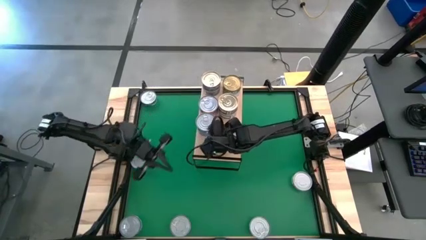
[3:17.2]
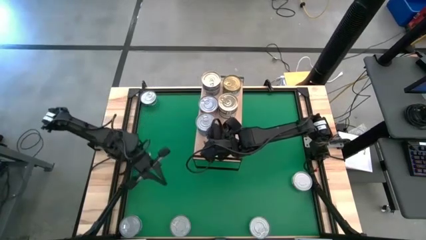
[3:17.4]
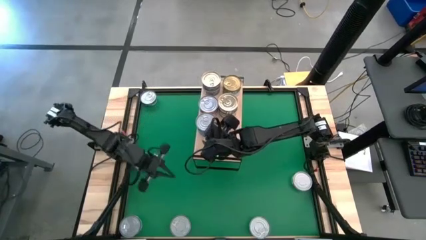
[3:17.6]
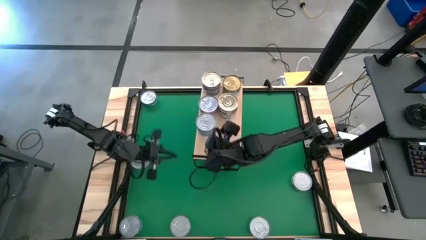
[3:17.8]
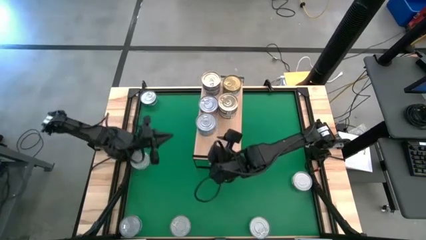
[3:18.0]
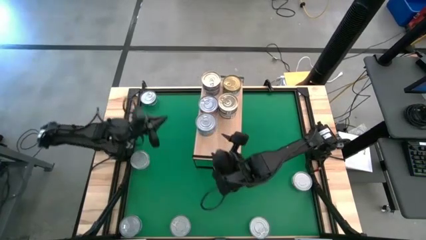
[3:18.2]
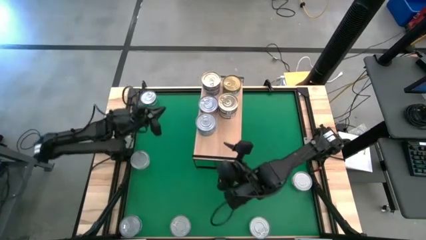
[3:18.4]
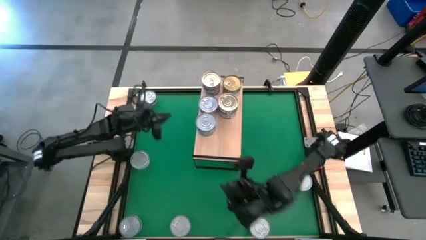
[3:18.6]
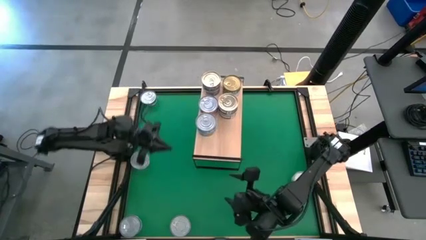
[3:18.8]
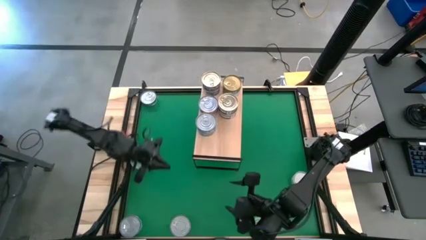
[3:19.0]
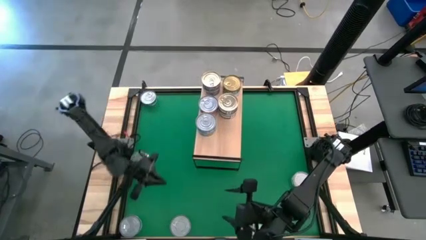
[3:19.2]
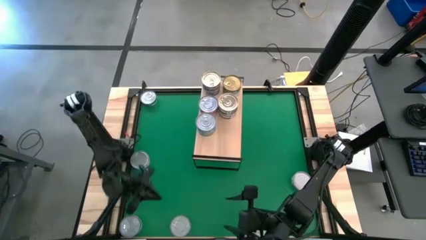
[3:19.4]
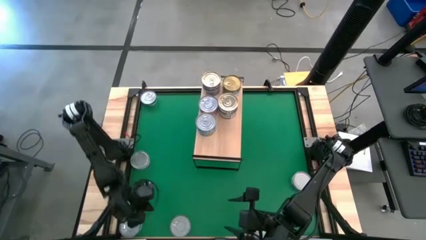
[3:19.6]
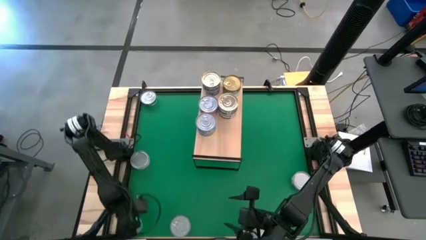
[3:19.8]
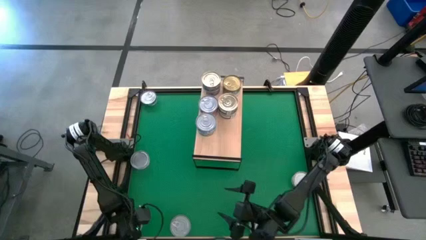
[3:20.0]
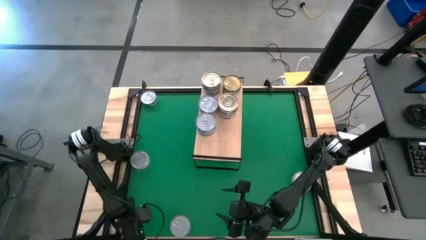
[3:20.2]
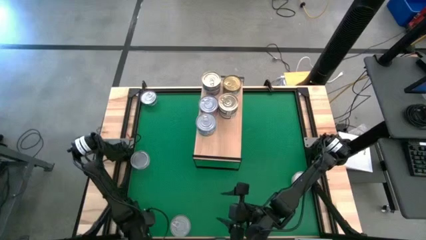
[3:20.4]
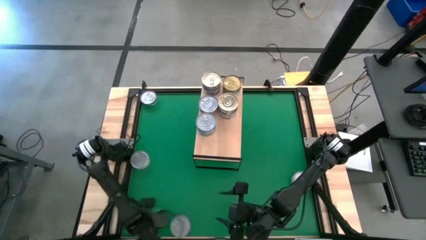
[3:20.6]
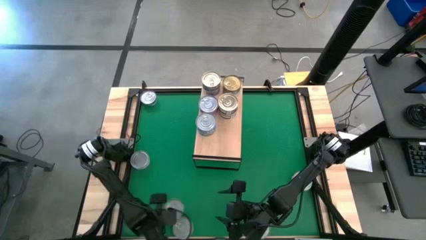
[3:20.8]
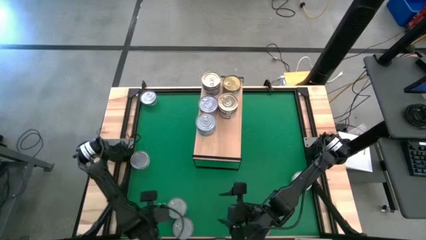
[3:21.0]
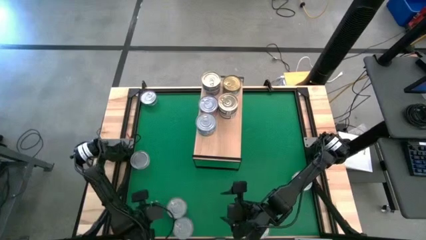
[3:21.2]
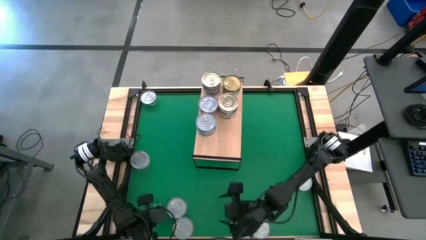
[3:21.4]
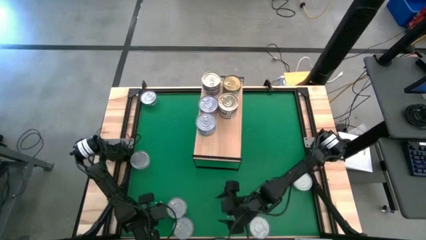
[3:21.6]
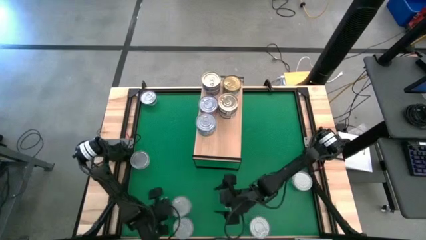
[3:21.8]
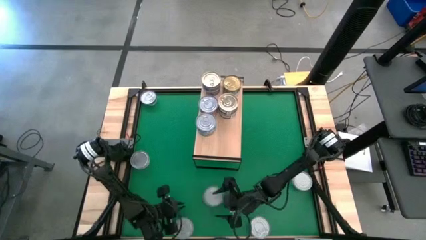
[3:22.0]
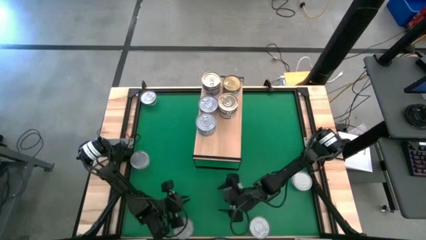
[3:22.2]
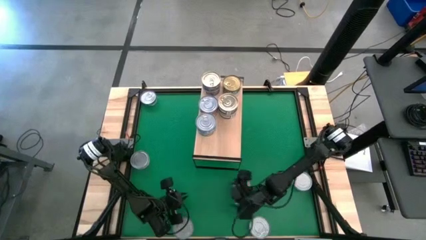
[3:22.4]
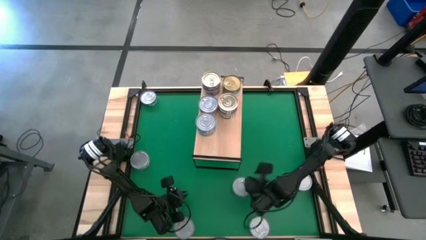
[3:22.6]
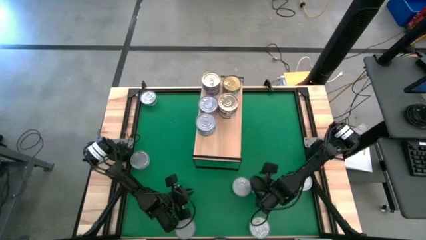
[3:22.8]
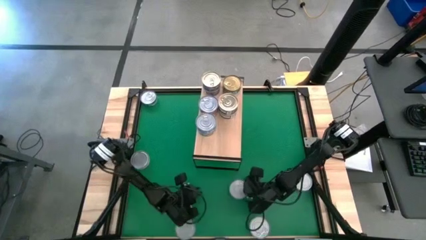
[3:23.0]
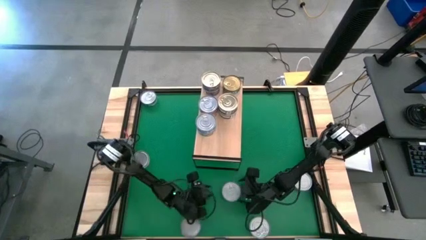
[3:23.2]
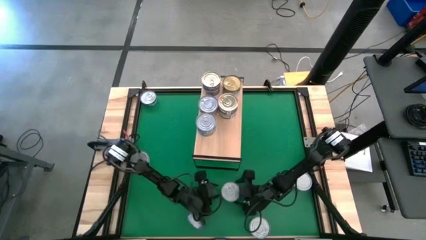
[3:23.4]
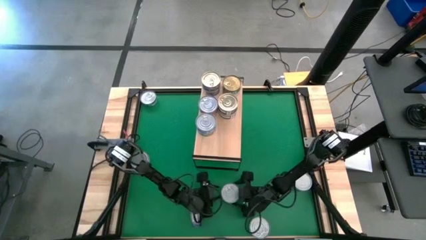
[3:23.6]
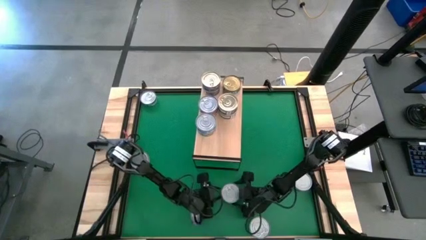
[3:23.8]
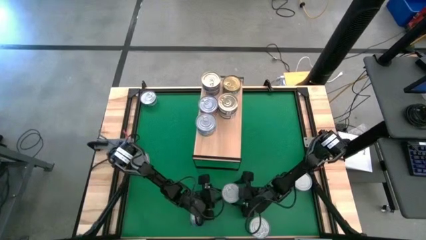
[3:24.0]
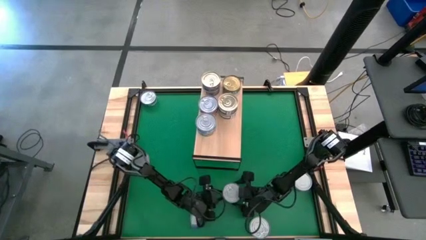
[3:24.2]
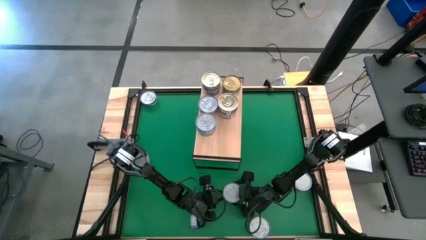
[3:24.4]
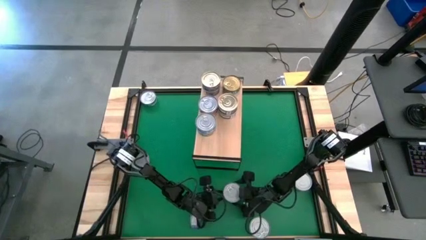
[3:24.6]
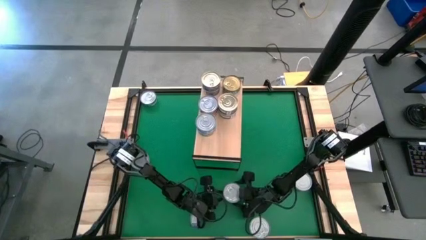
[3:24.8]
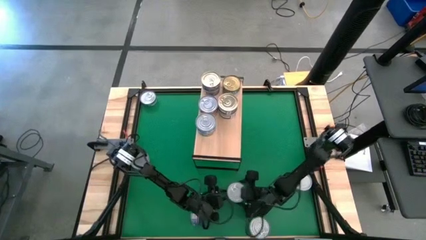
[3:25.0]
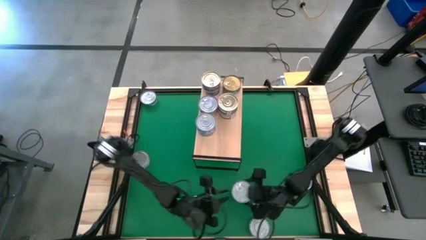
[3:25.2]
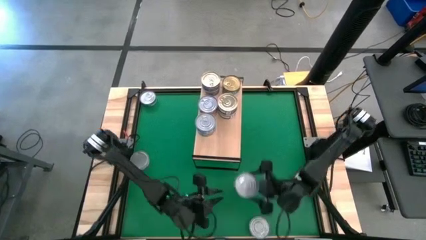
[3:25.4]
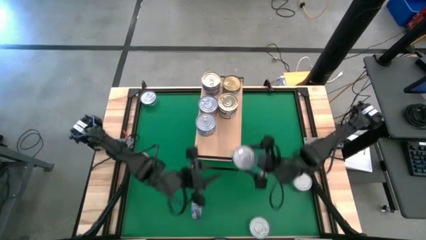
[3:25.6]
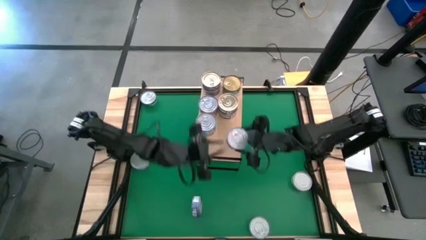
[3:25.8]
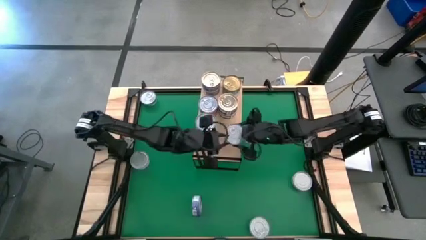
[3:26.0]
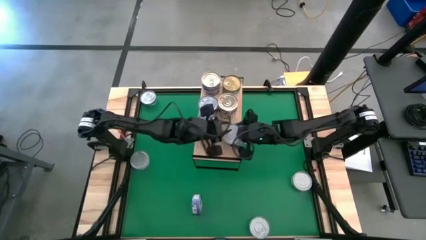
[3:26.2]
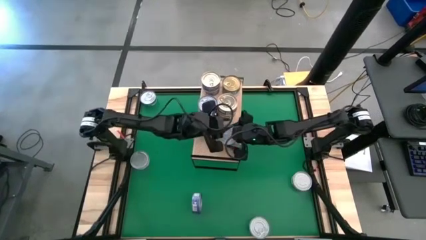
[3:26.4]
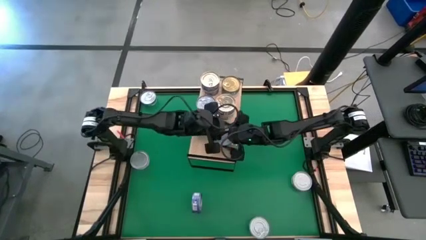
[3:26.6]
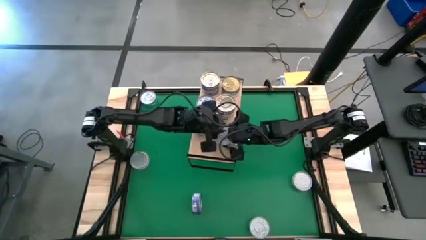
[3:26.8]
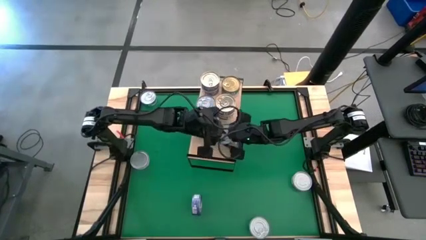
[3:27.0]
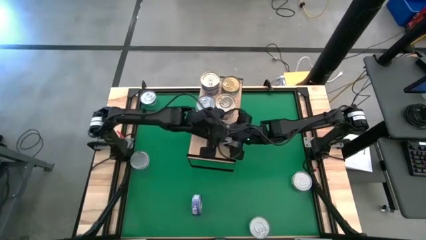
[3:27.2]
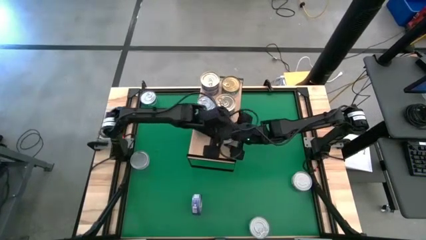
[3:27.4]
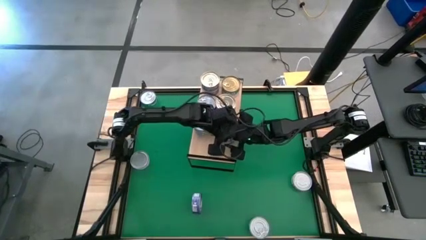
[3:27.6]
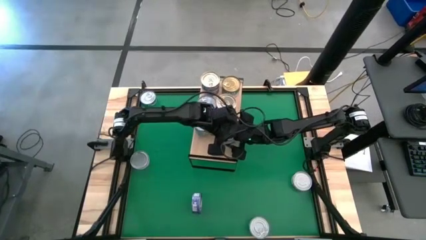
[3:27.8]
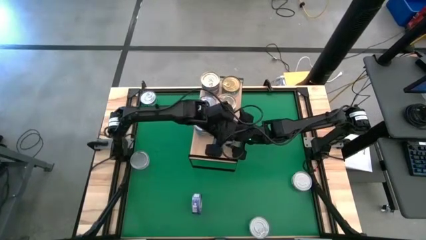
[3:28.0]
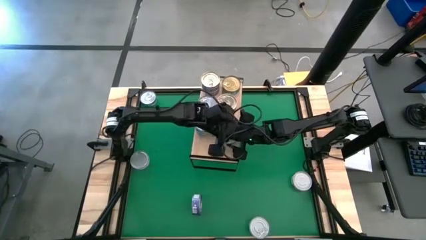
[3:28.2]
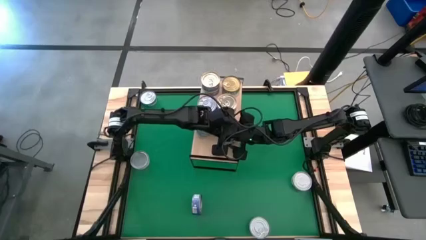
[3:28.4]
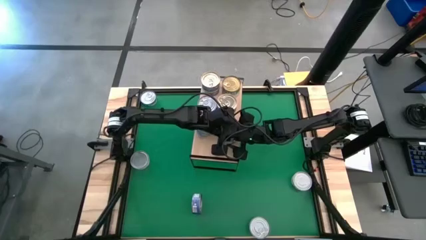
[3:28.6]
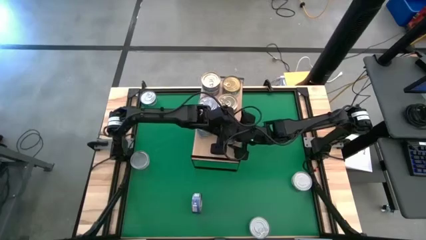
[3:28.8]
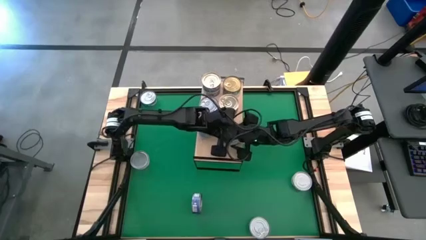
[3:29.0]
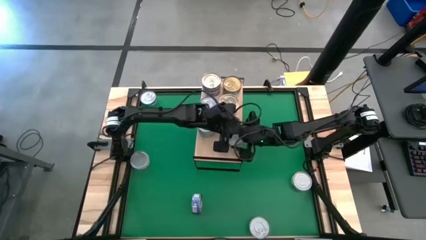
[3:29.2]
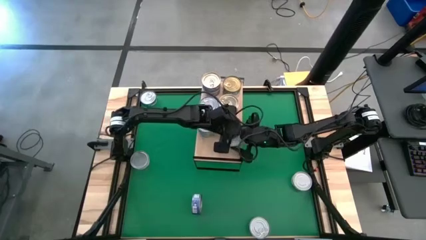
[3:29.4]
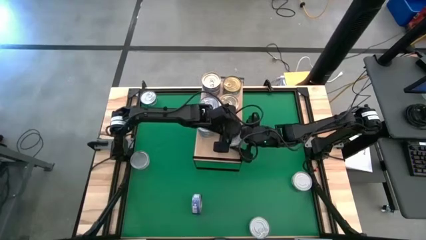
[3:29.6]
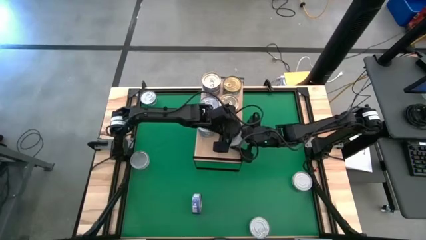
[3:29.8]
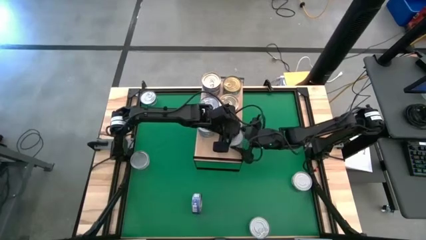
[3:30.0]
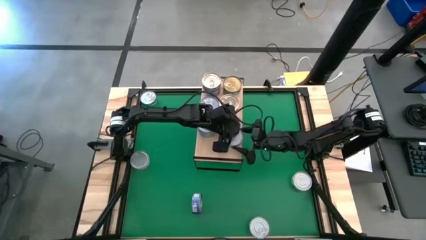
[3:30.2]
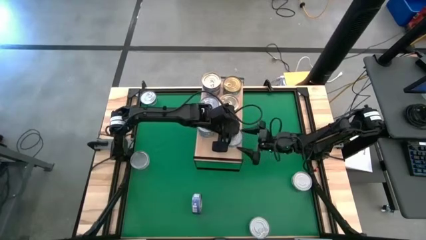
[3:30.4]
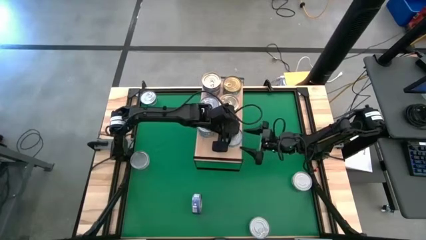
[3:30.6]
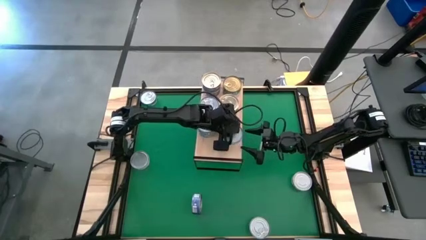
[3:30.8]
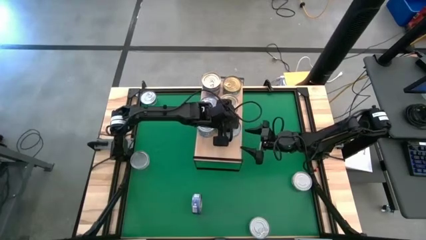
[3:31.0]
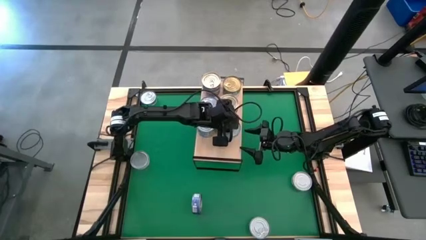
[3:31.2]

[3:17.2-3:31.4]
Task: Stack canned seafood by type on shelf
Put the green blue tuna can on the shelf
